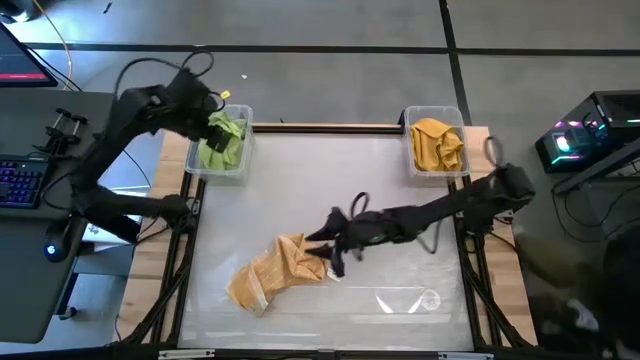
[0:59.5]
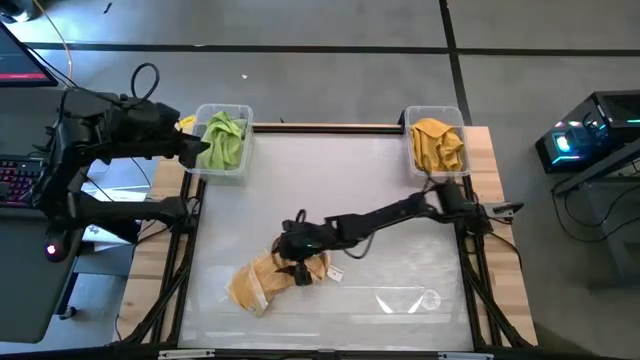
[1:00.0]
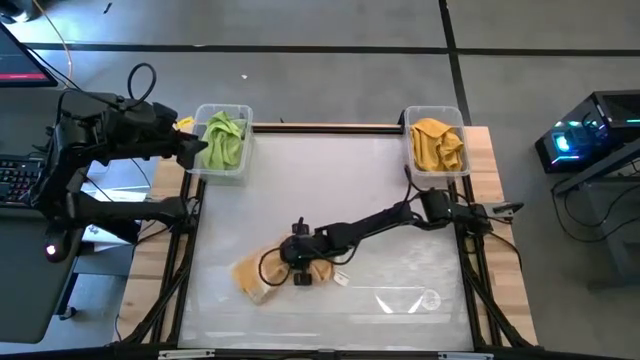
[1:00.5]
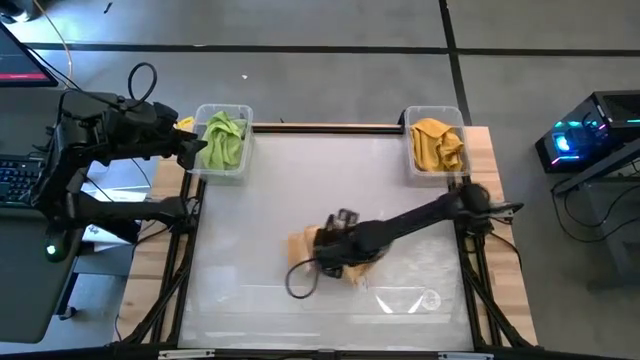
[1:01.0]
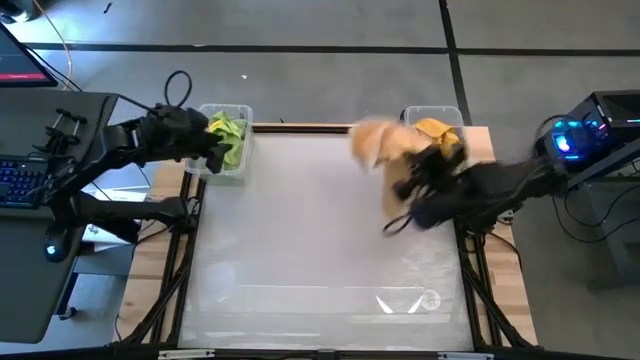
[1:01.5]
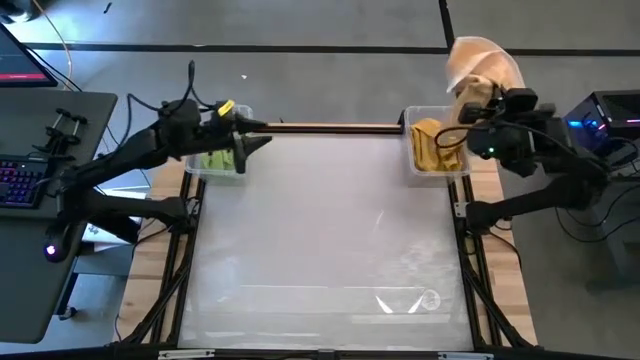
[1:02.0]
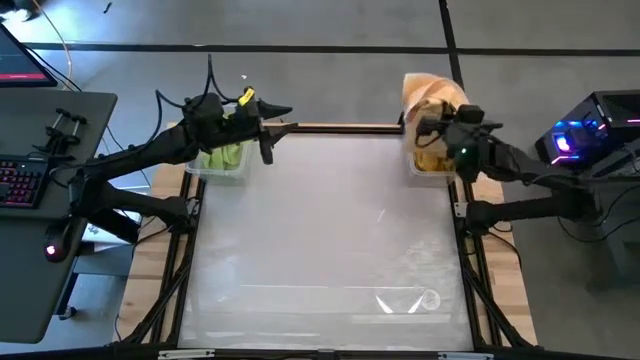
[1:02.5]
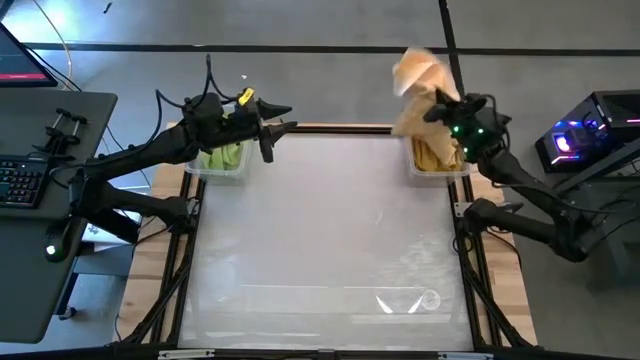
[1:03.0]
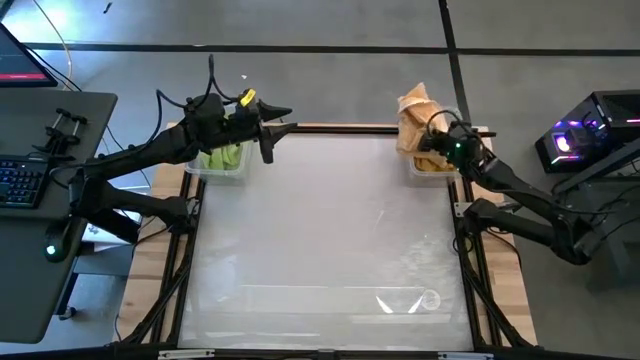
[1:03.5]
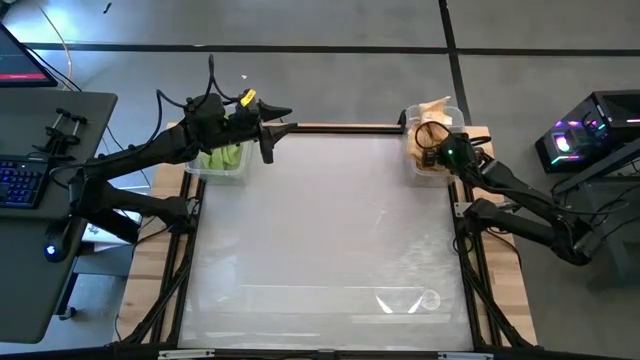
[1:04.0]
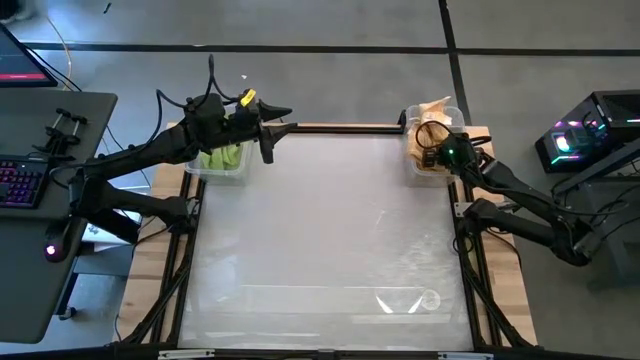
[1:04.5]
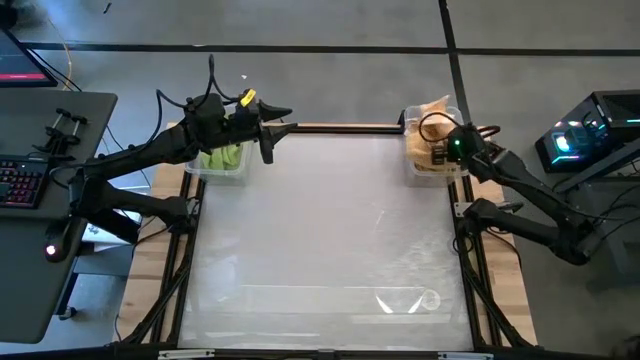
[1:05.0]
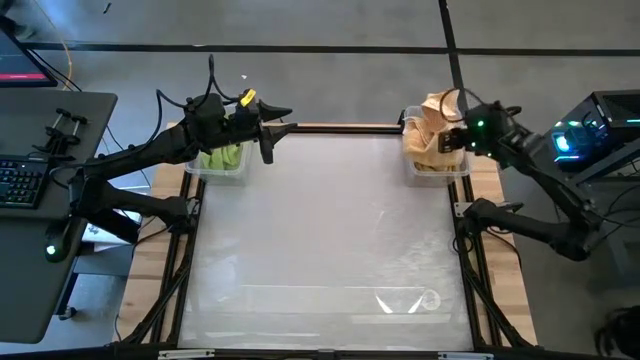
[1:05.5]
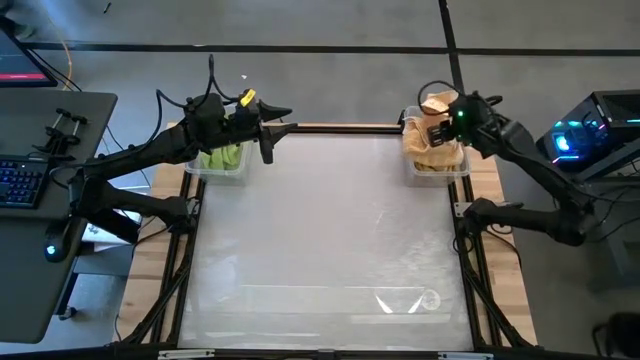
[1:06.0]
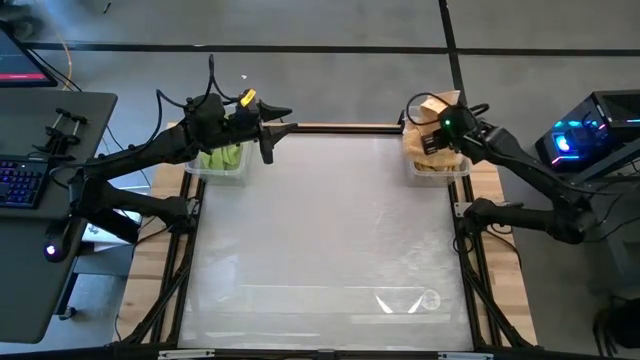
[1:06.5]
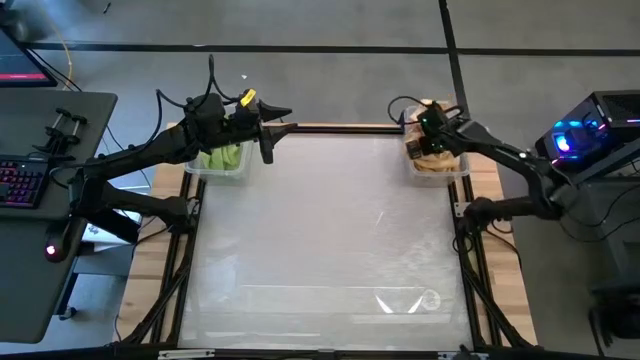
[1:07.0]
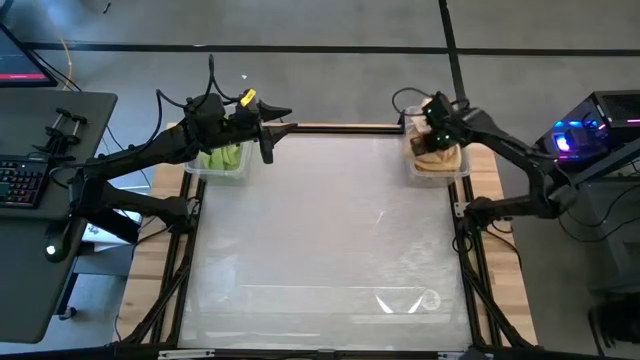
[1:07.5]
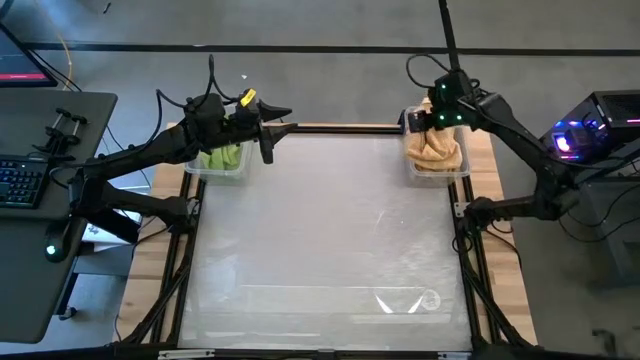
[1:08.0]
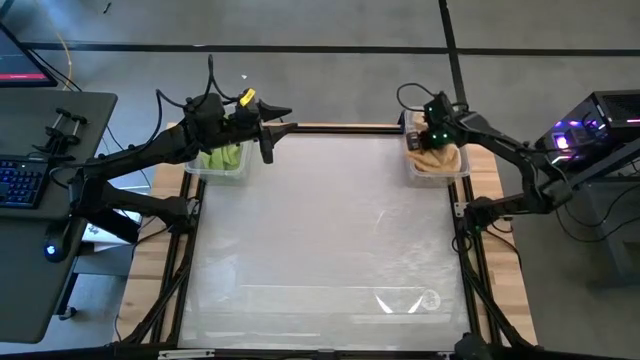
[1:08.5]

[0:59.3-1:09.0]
Task: Sort towels by color in basket
Put the light yellow kitchen towel into the right transparent bin

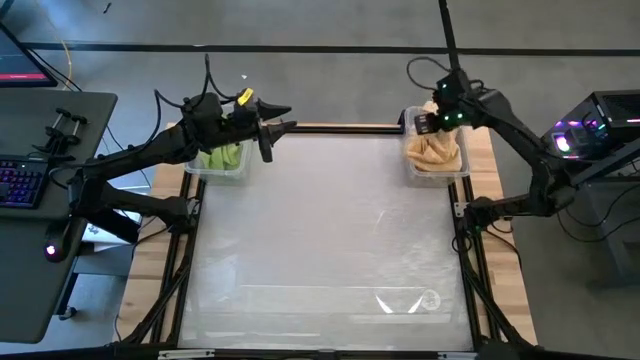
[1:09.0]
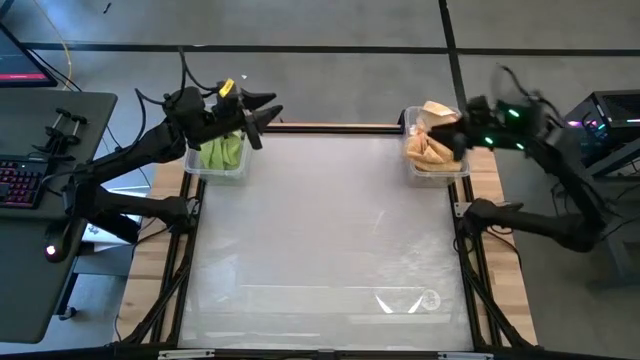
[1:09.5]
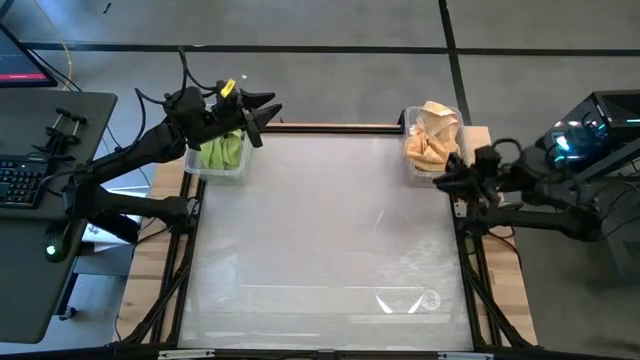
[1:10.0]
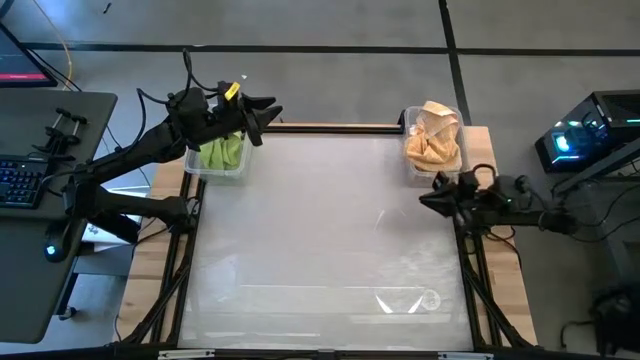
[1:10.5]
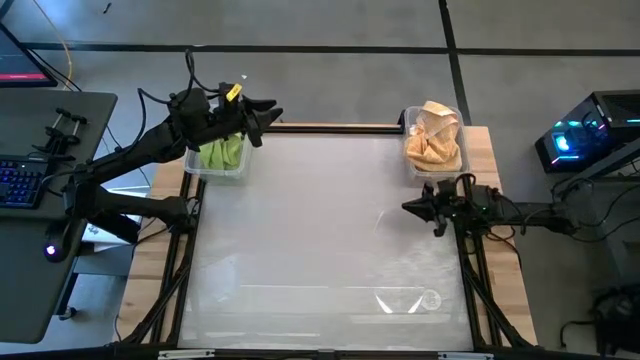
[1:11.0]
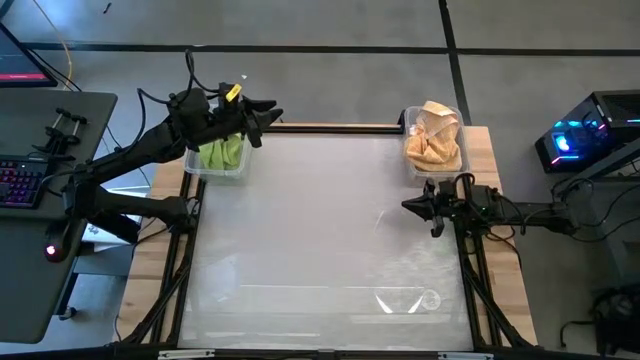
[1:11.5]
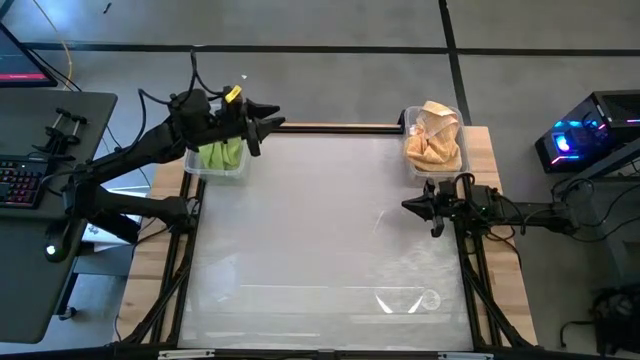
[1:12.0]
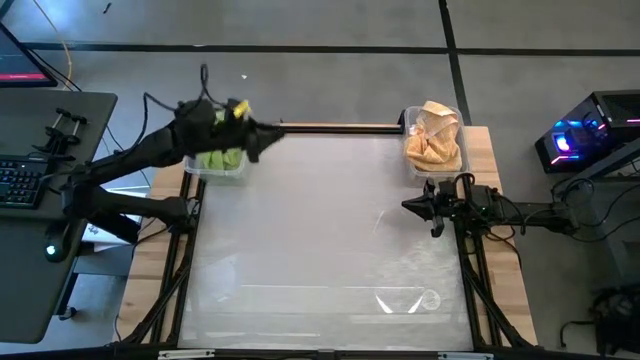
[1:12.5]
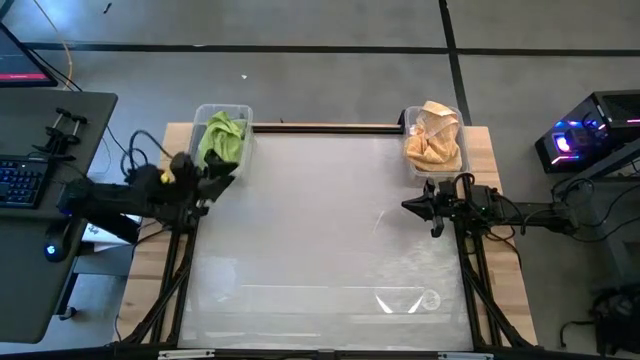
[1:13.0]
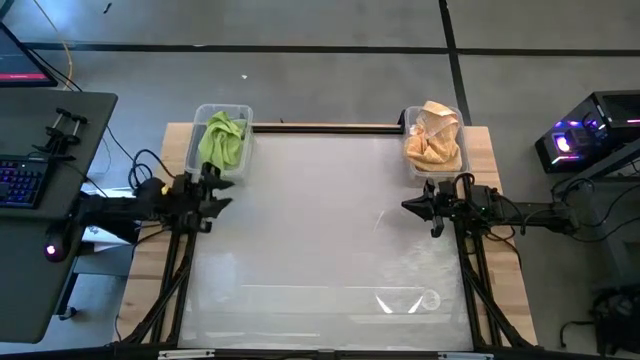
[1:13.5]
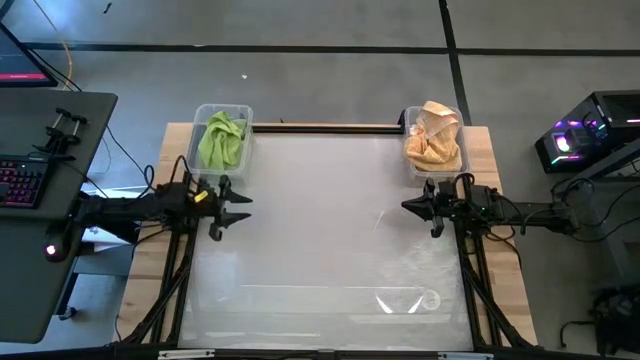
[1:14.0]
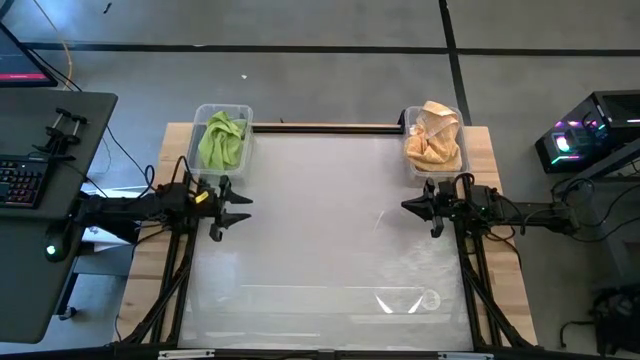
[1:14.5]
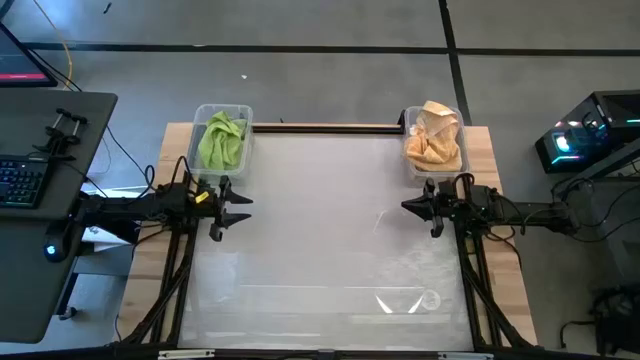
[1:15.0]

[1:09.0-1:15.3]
Return to Home Position

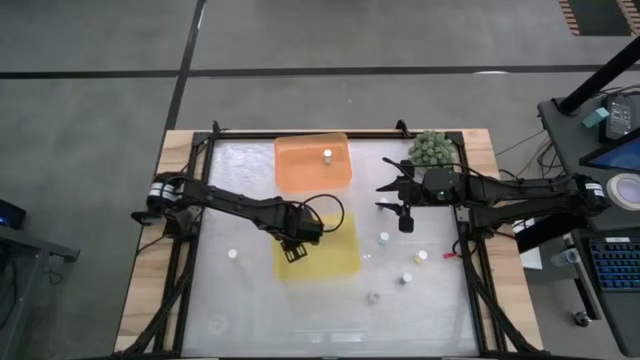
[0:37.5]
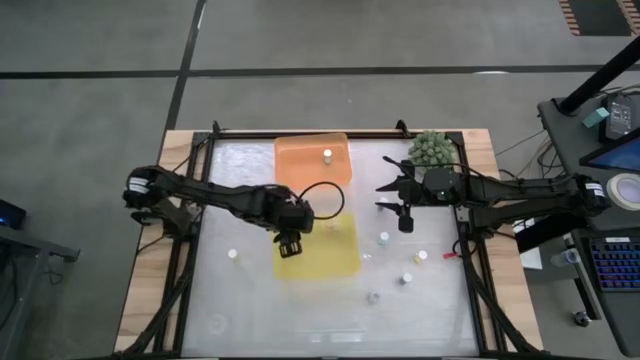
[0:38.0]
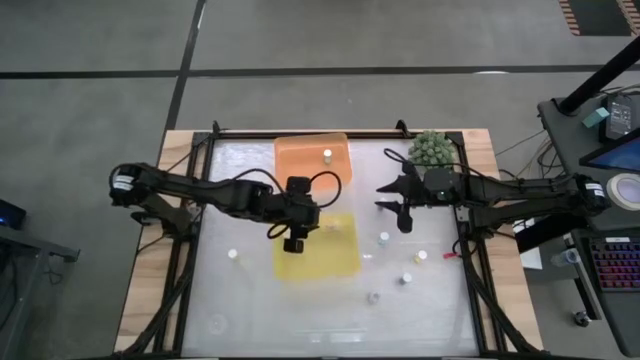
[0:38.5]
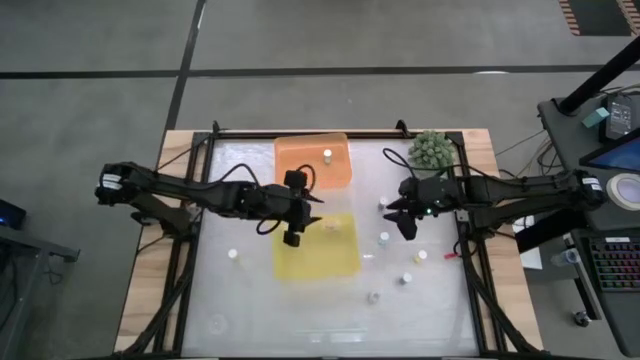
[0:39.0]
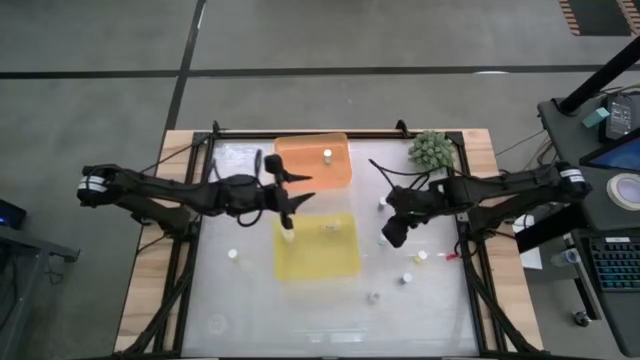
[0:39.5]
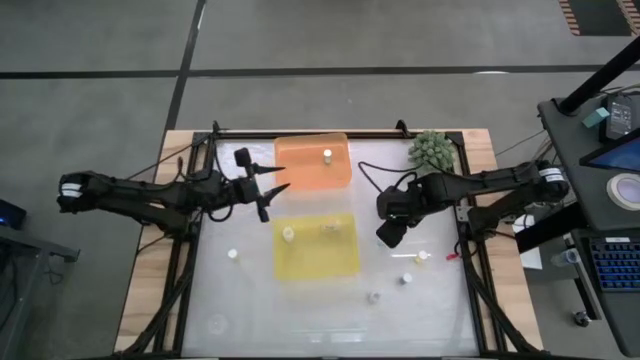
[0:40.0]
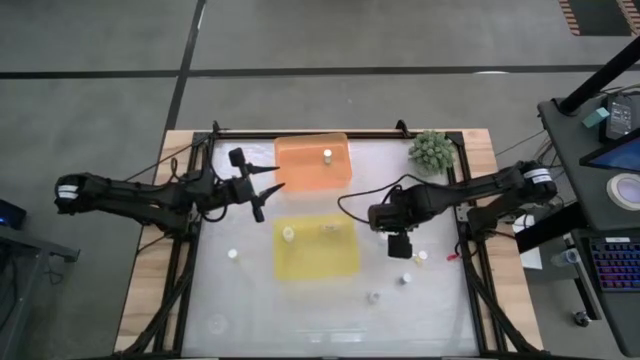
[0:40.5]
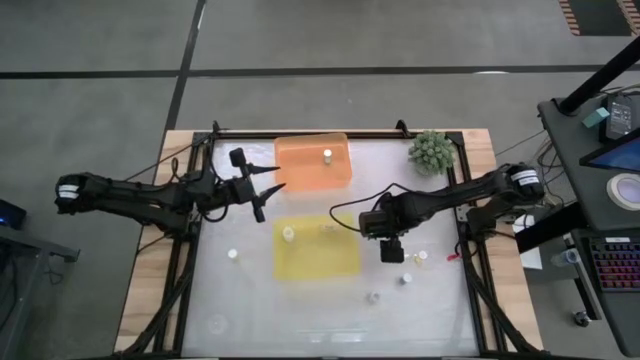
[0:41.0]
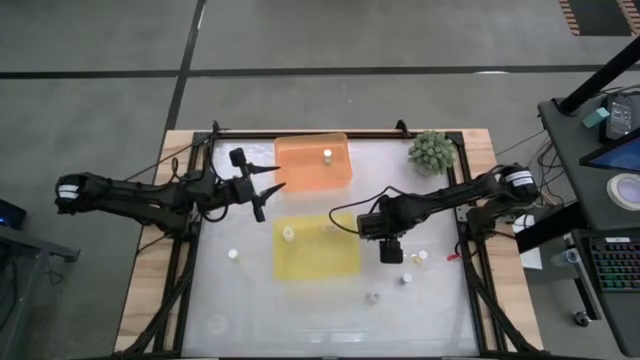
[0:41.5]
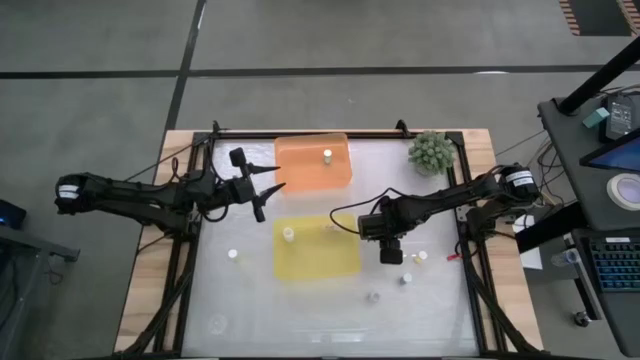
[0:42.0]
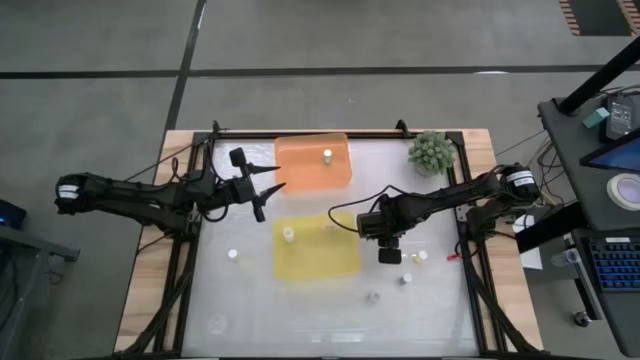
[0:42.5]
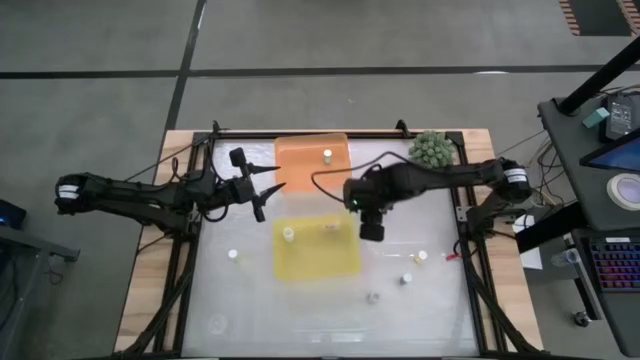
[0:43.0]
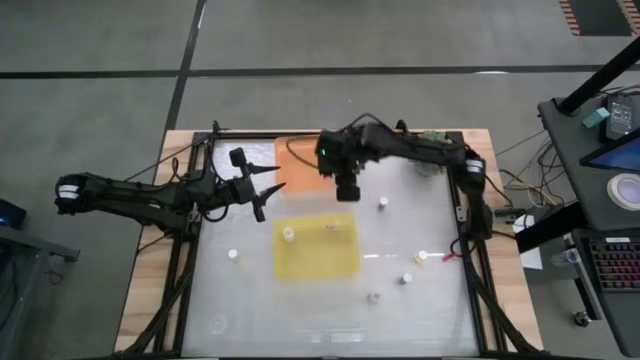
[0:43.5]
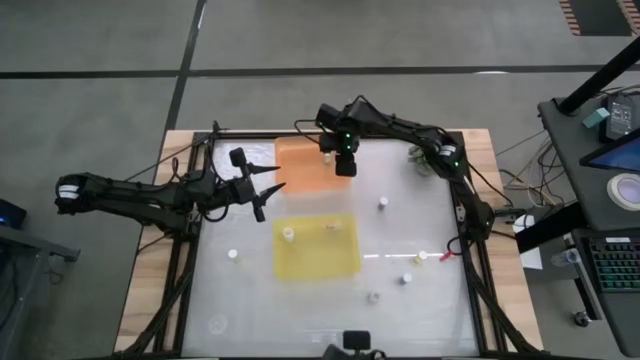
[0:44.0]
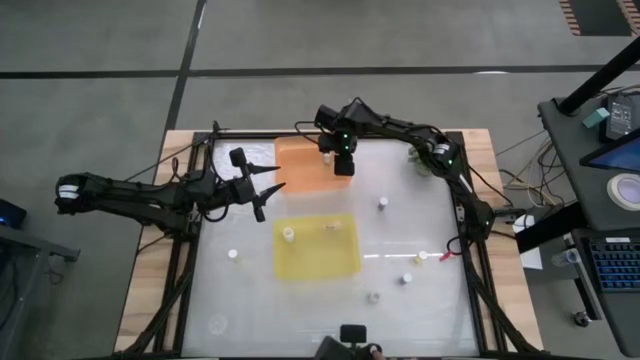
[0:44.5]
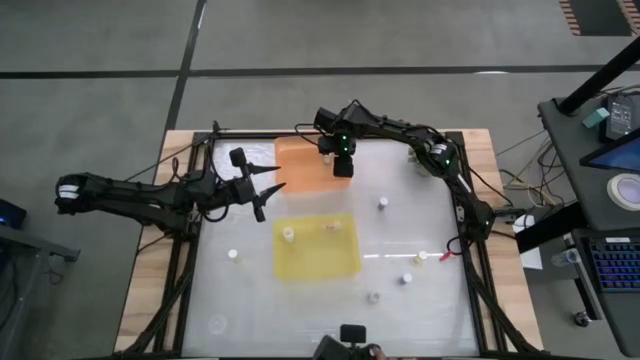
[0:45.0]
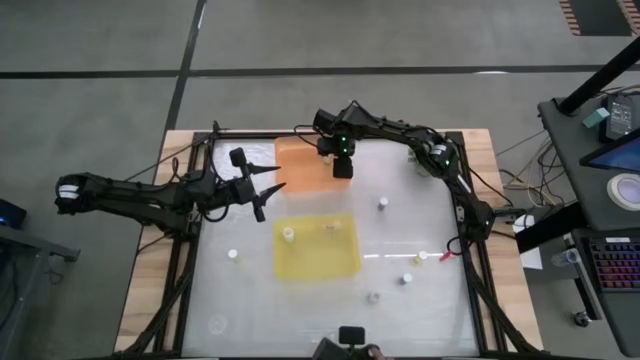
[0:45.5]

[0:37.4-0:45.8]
Task: Pick and place medicine bottles into bin by pill shape (circle, oval)
Put the green tablet bottle into the orange bin
